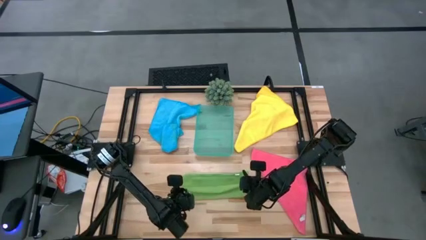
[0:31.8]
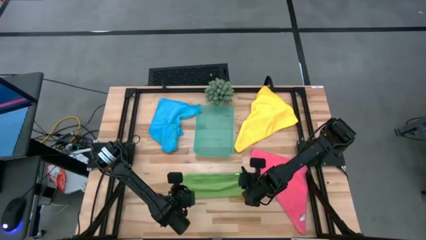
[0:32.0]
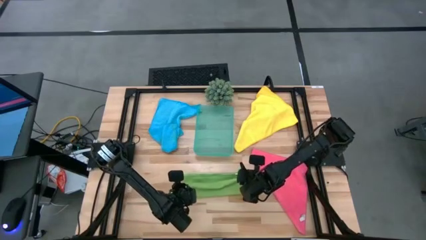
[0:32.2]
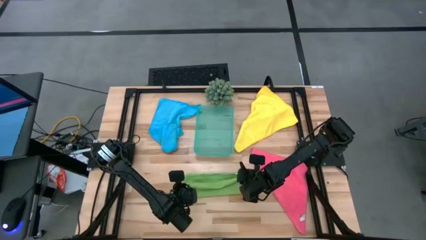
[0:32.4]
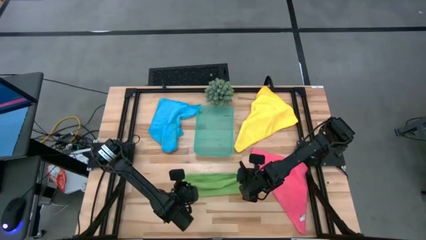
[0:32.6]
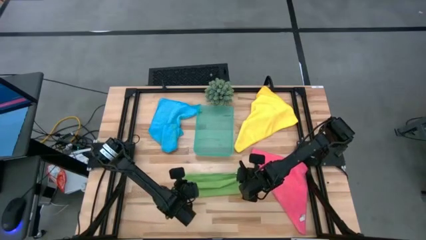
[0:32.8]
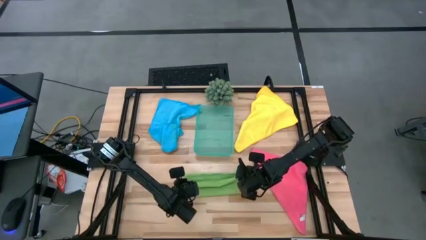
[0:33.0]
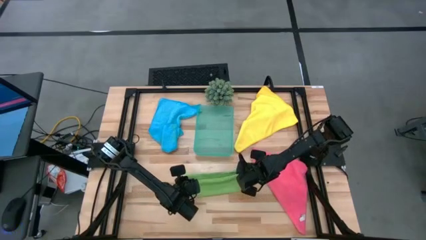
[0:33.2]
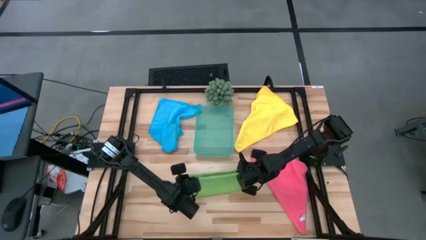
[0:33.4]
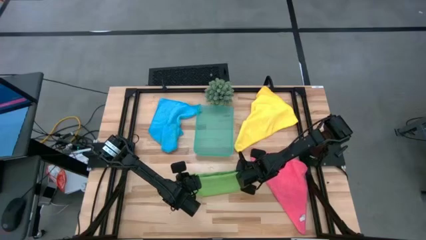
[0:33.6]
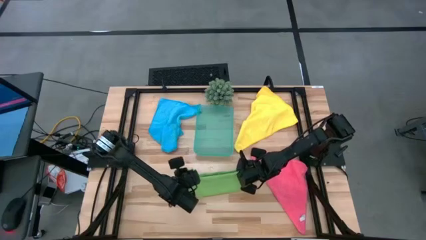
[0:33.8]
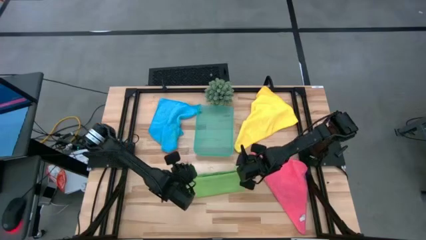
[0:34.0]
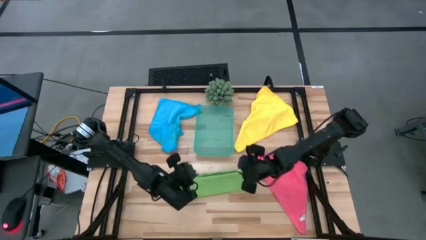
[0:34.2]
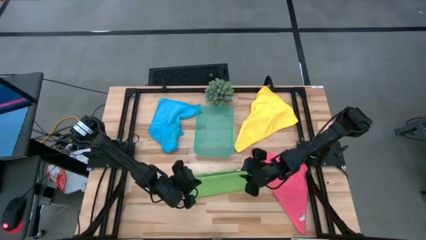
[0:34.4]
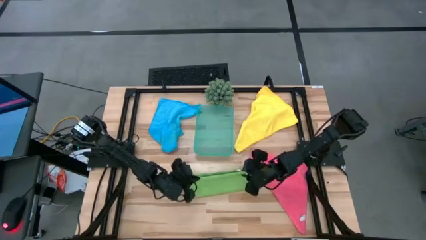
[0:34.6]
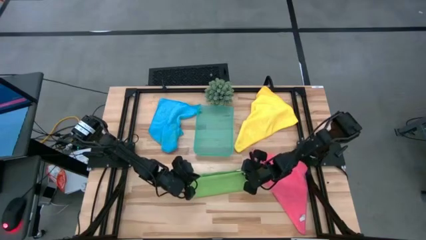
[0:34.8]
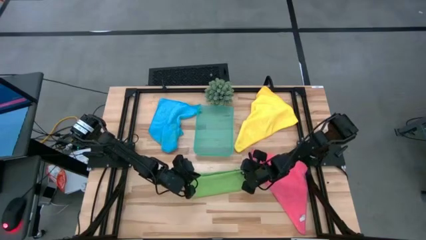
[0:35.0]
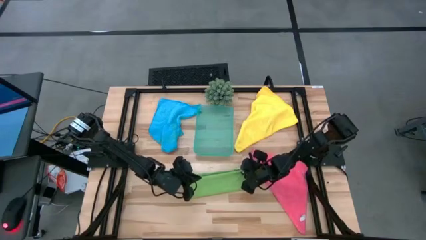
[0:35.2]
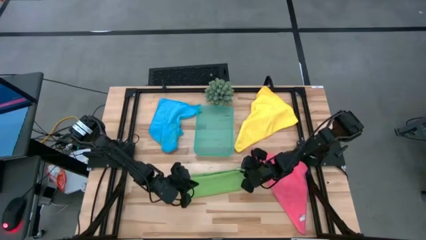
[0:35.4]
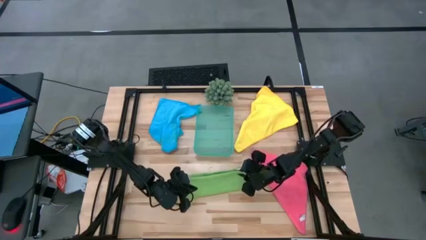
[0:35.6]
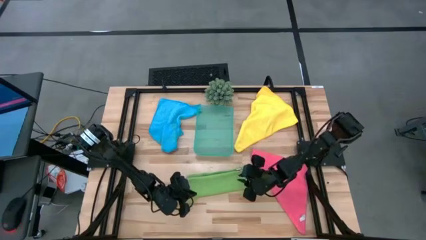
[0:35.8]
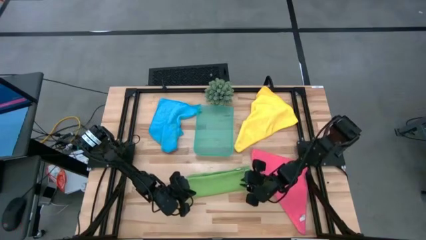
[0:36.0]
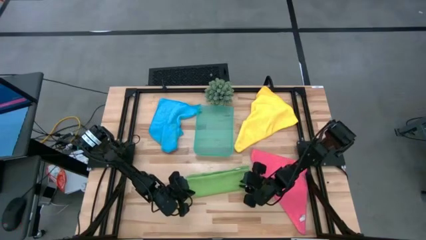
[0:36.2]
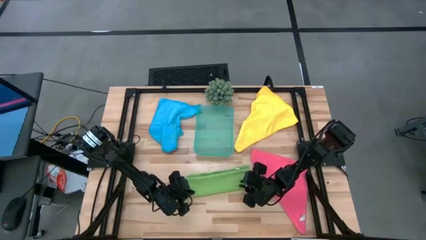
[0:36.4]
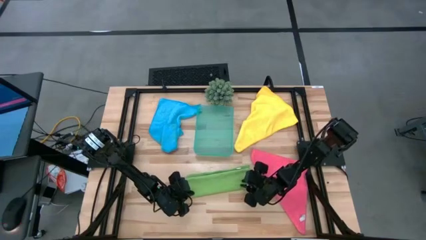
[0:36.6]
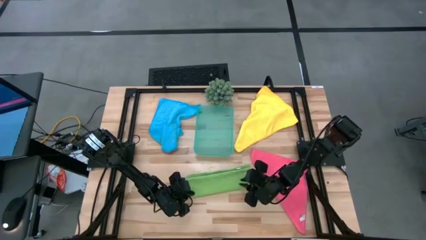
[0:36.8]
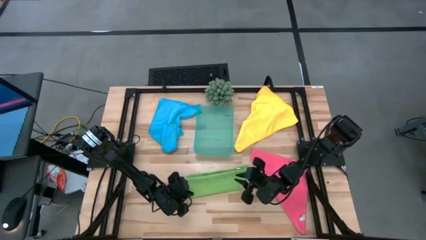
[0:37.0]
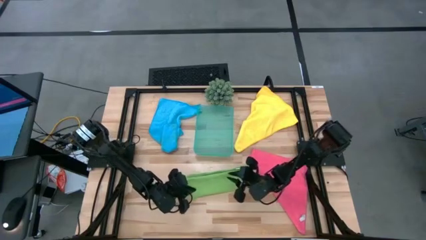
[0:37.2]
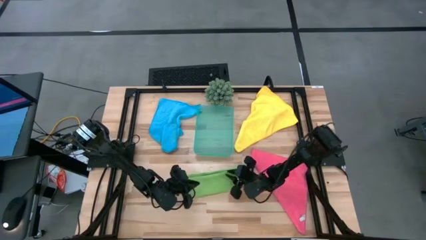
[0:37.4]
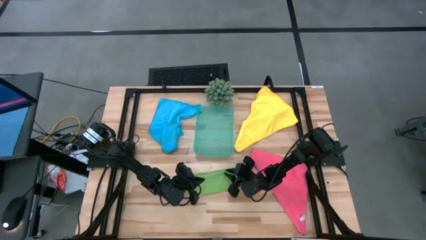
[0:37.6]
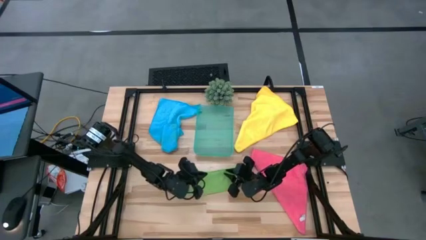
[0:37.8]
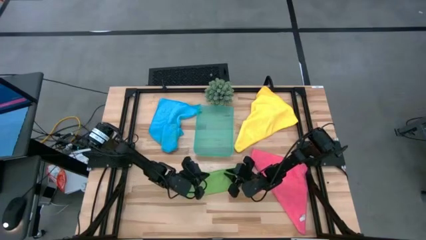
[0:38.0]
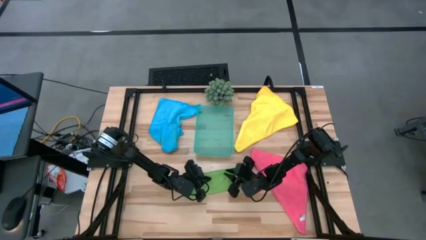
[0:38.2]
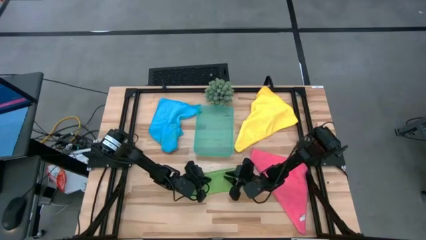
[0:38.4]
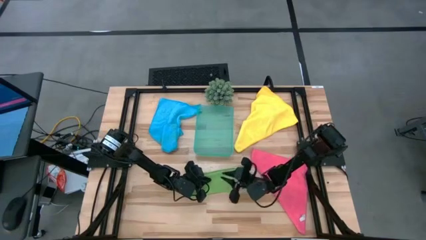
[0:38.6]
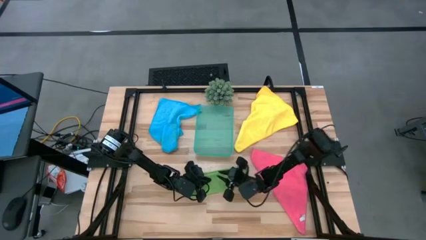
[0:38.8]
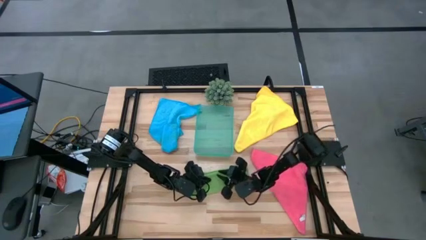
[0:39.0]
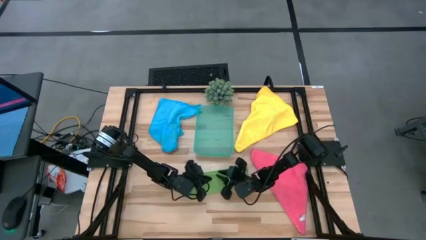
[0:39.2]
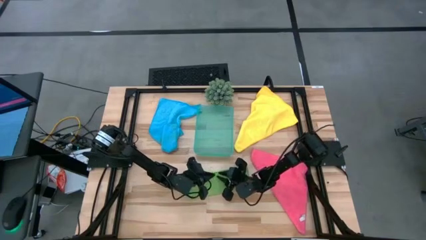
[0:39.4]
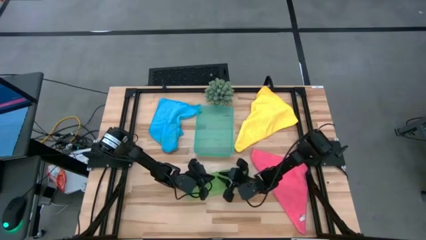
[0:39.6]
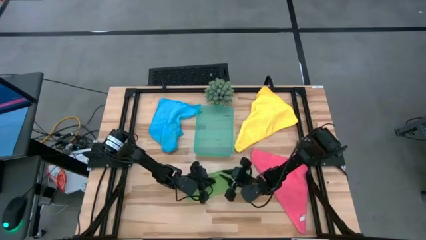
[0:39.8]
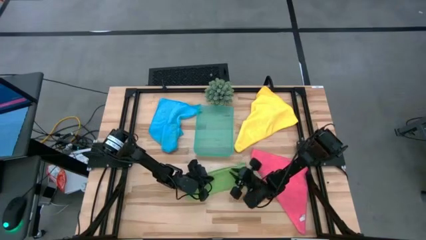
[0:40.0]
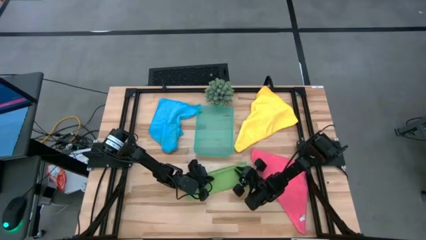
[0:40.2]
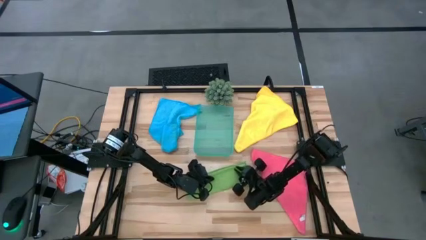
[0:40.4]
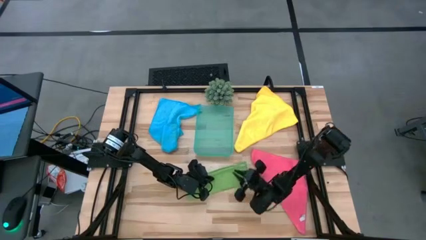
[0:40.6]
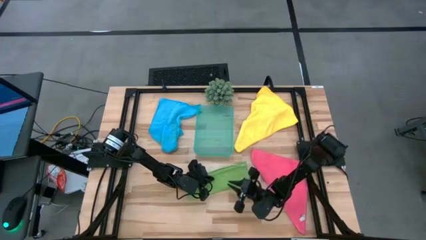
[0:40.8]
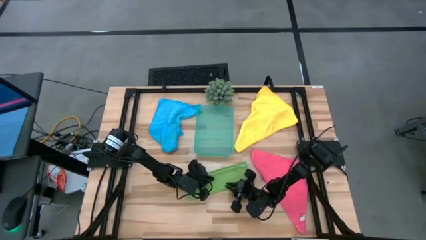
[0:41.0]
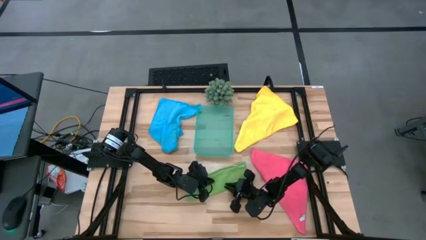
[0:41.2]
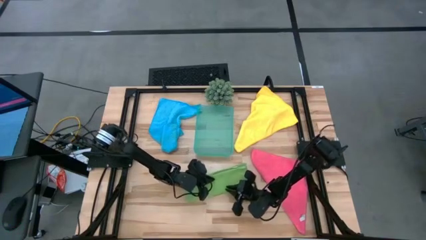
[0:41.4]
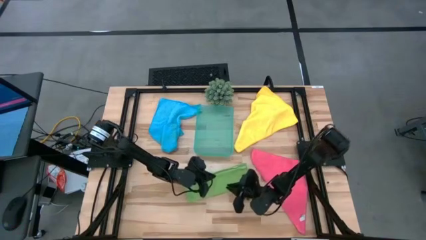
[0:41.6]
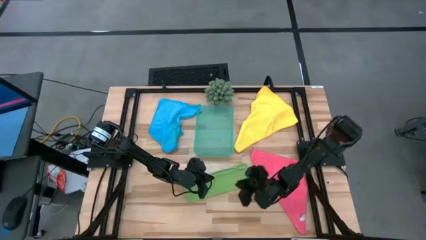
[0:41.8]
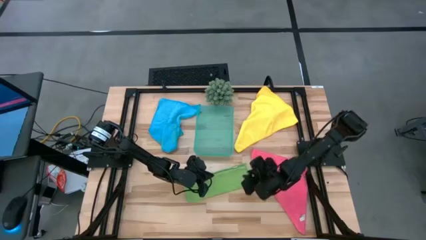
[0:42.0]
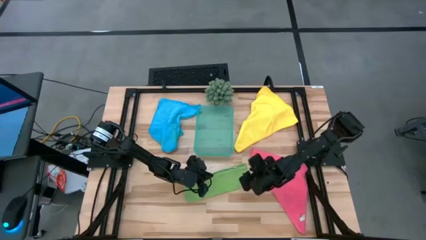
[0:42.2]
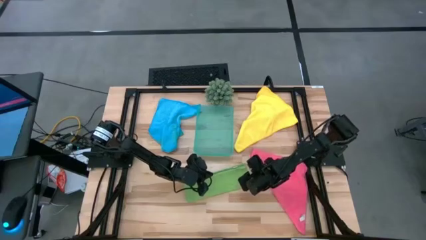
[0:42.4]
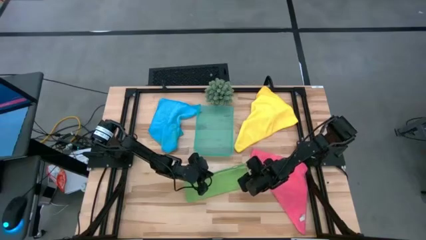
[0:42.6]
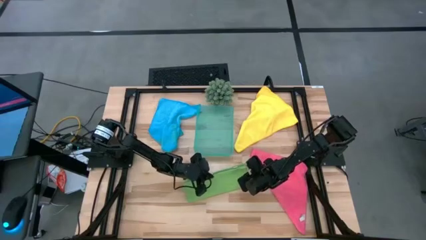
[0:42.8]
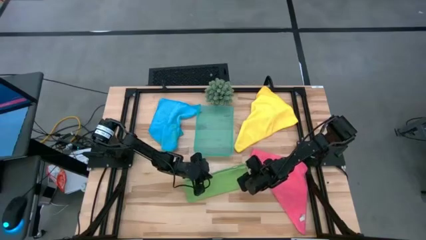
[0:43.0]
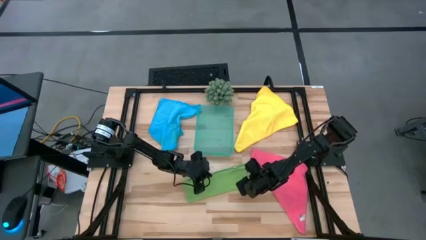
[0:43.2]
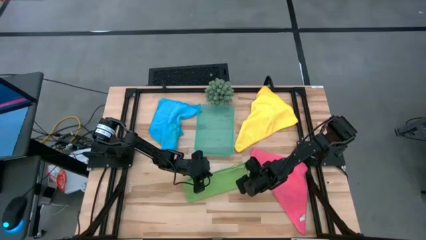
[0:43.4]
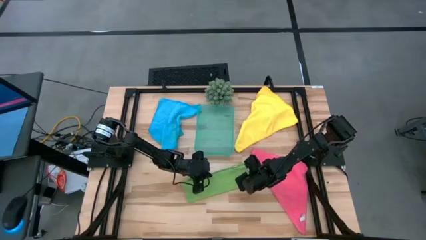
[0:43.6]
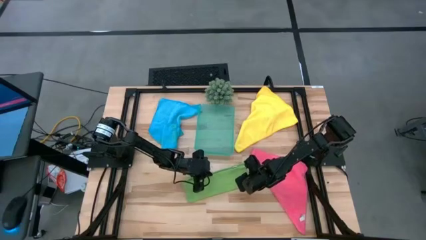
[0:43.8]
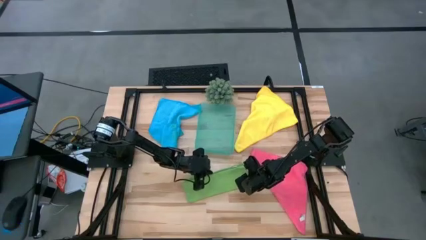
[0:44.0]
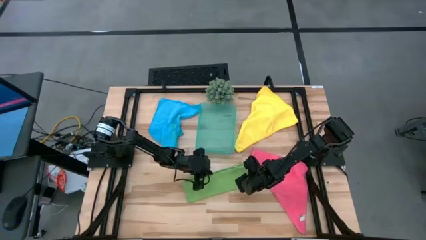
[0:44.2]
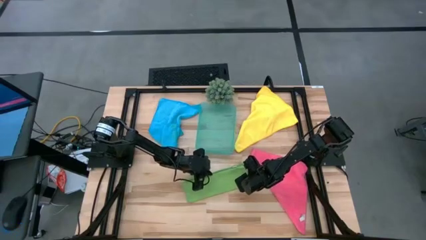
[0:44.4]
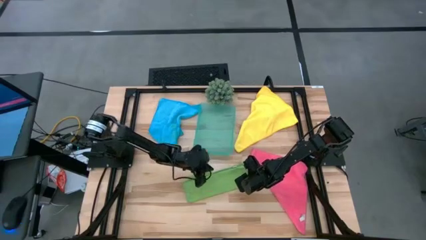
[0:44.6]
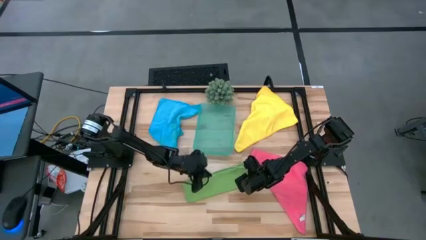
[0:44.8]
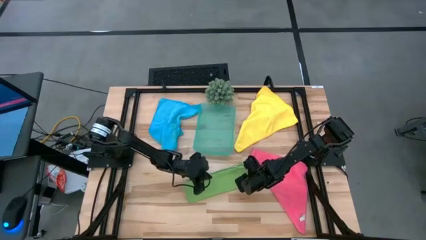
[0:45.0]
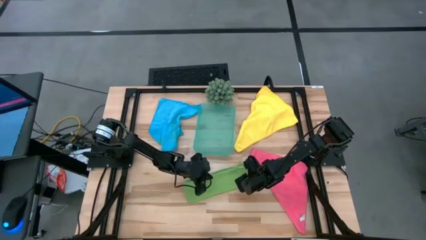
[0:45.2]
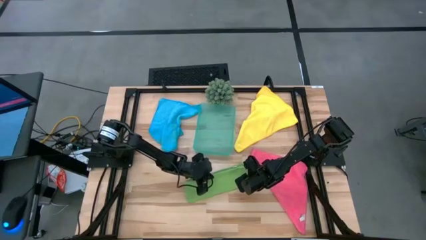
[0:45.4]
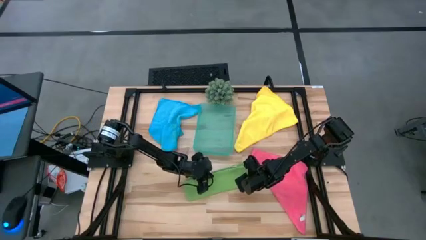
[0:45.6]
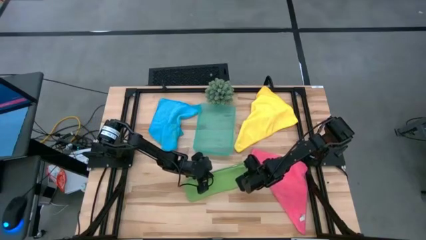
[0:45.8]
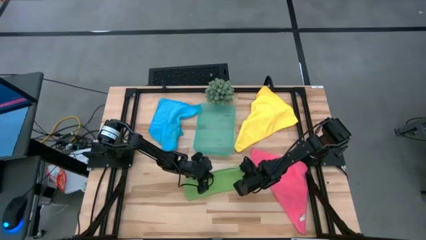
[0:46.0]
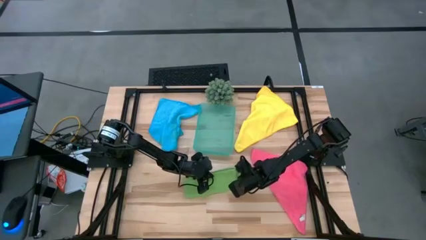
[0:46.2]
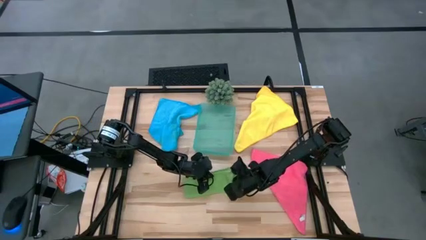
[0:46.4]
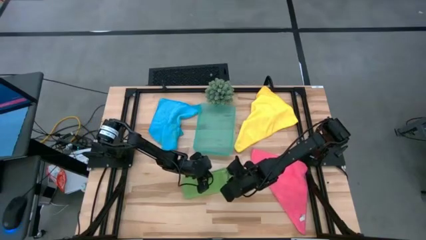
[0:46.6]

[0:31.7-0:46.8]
Task: Fold microfiber towels
Fold the green micro fiber cloth
